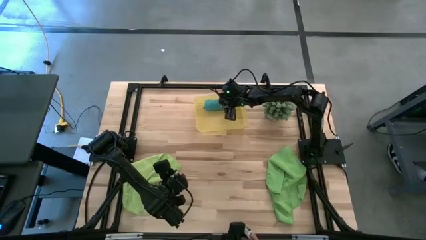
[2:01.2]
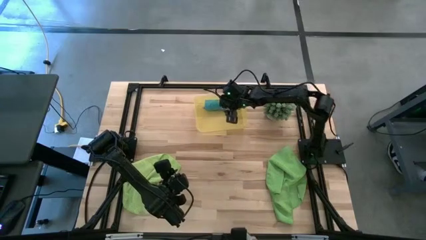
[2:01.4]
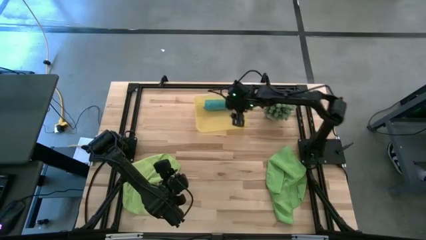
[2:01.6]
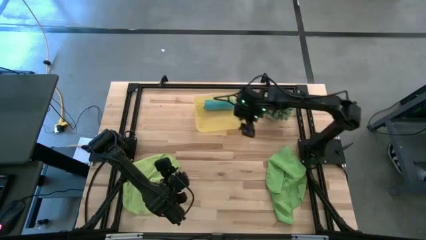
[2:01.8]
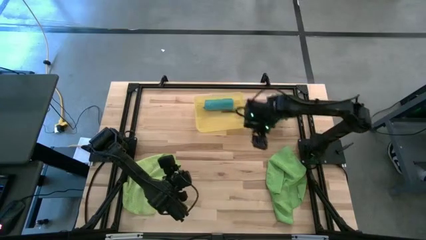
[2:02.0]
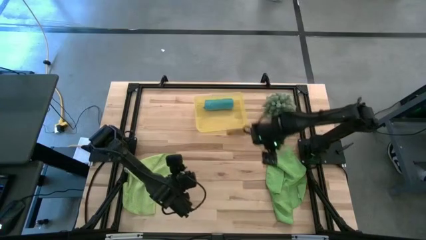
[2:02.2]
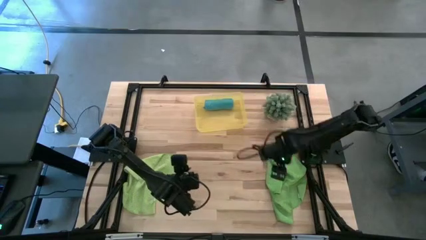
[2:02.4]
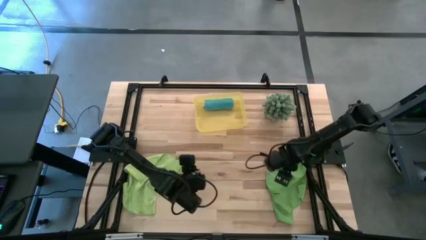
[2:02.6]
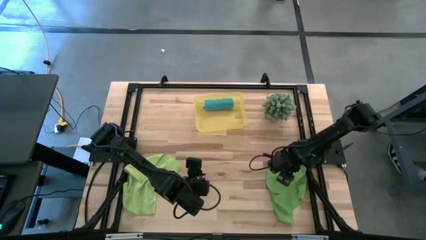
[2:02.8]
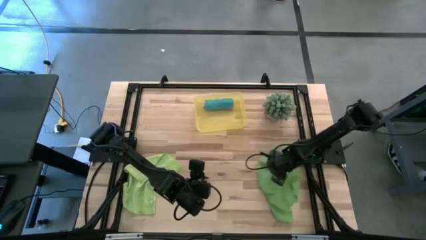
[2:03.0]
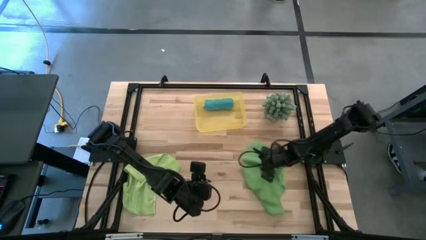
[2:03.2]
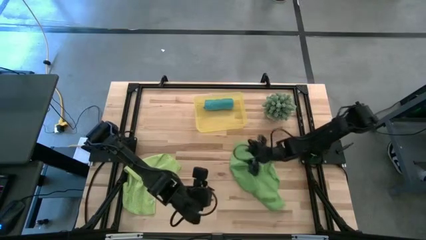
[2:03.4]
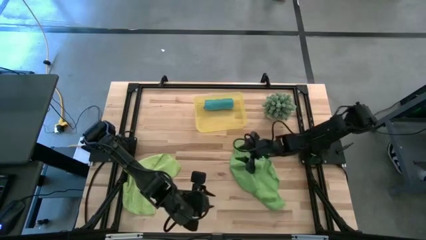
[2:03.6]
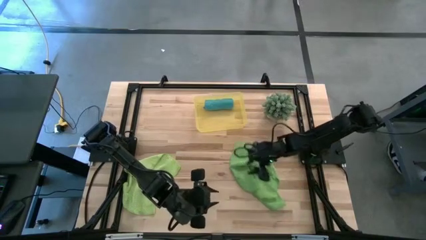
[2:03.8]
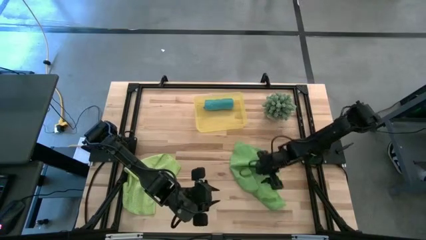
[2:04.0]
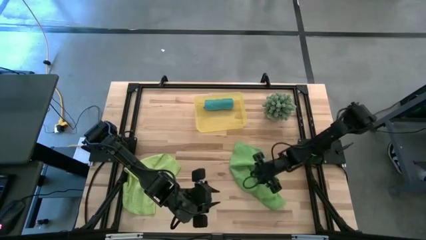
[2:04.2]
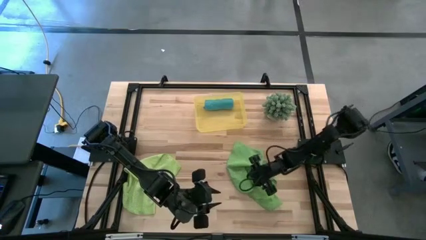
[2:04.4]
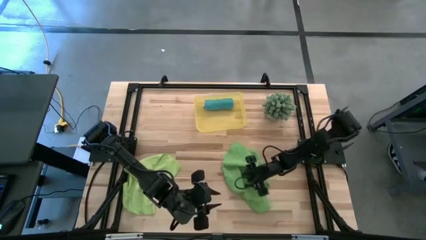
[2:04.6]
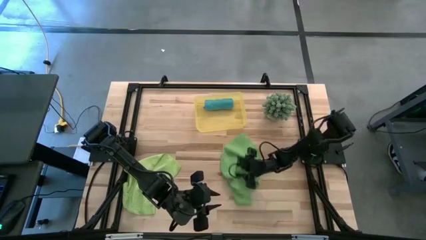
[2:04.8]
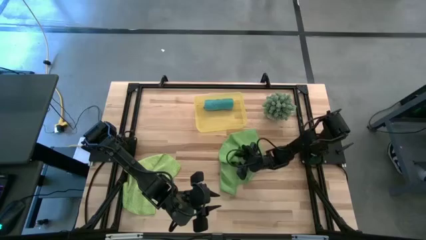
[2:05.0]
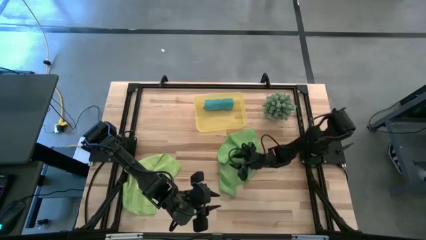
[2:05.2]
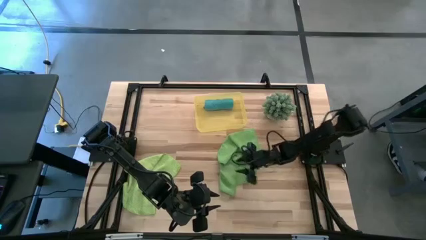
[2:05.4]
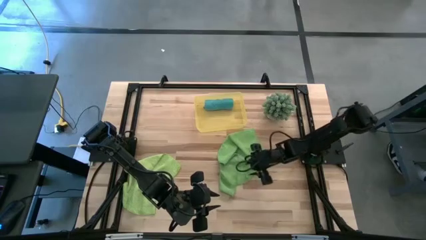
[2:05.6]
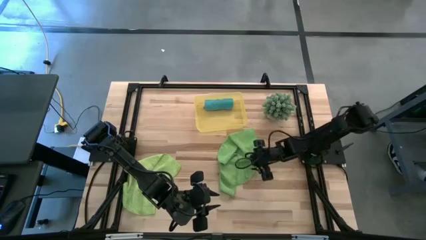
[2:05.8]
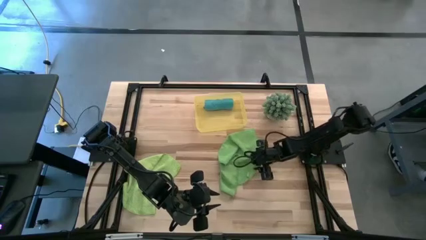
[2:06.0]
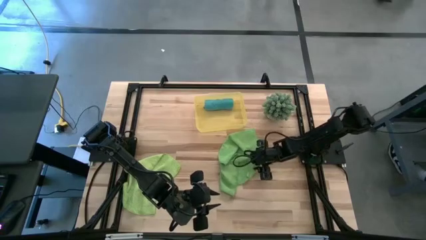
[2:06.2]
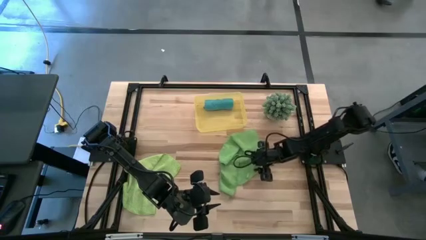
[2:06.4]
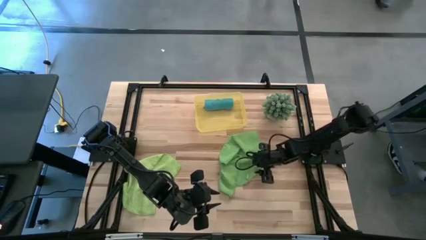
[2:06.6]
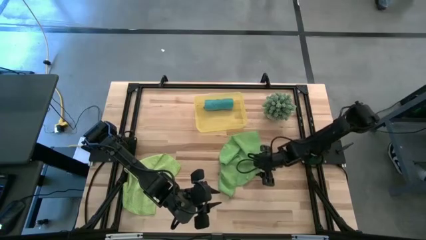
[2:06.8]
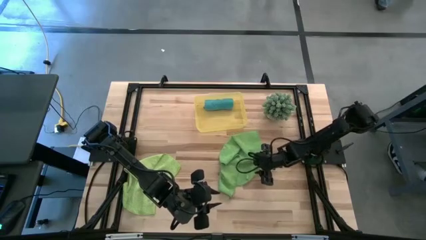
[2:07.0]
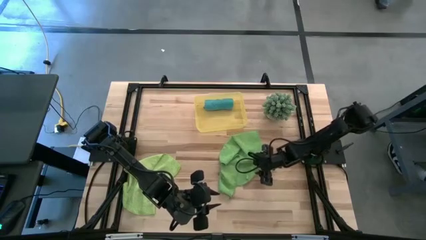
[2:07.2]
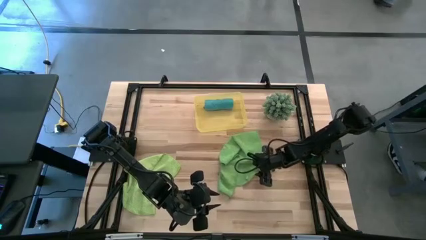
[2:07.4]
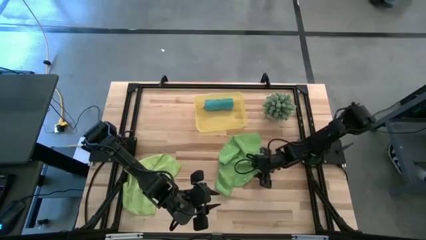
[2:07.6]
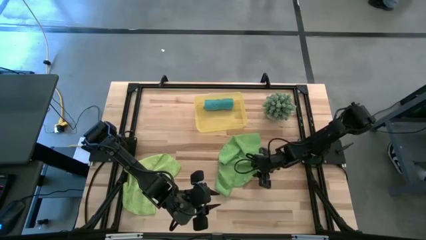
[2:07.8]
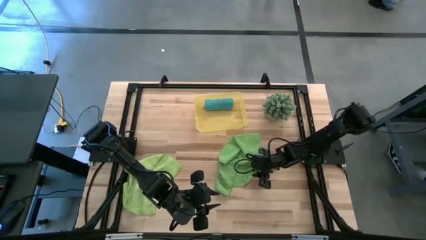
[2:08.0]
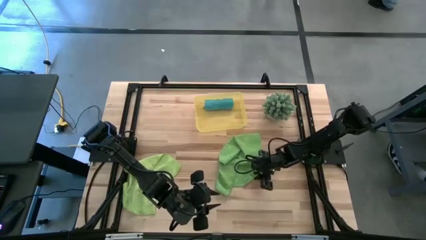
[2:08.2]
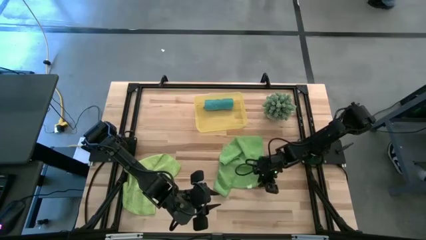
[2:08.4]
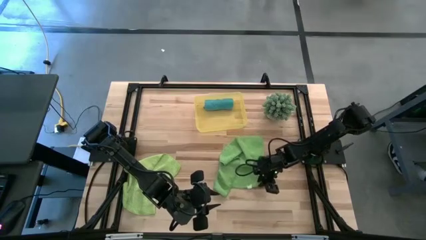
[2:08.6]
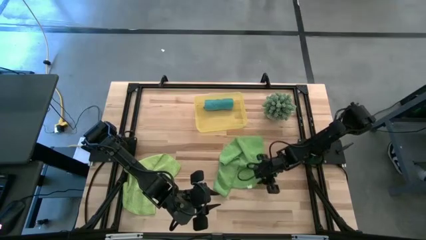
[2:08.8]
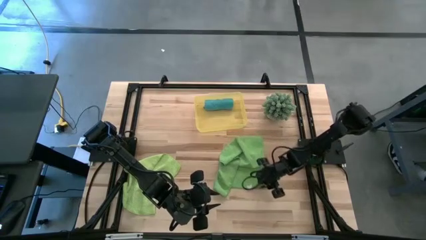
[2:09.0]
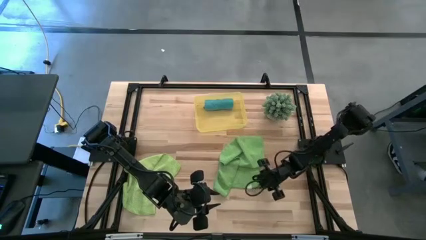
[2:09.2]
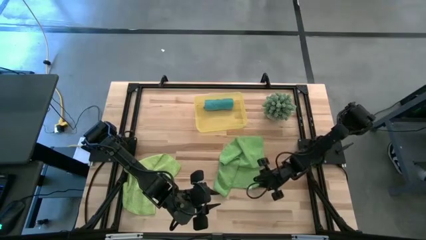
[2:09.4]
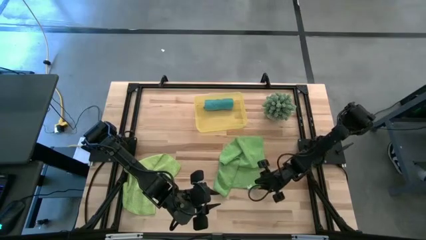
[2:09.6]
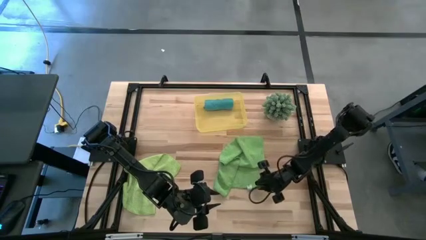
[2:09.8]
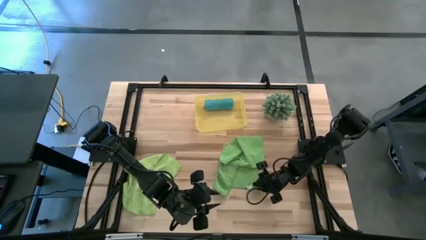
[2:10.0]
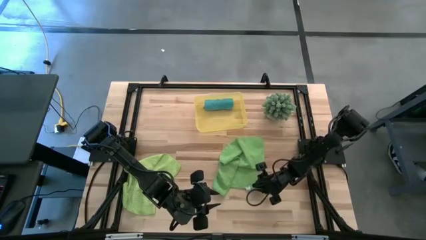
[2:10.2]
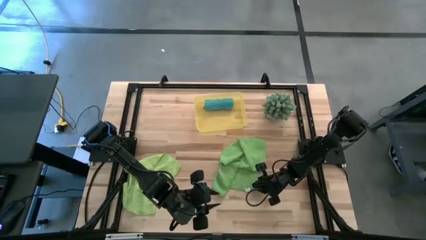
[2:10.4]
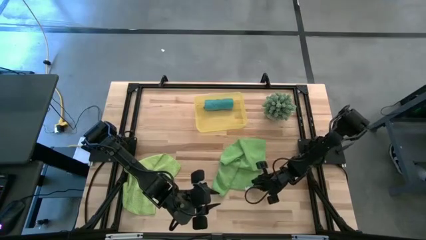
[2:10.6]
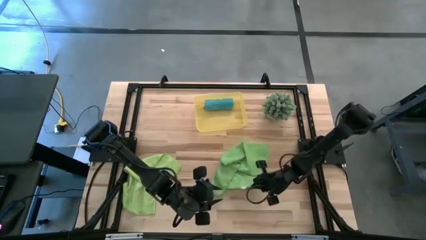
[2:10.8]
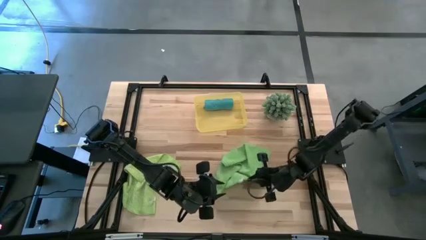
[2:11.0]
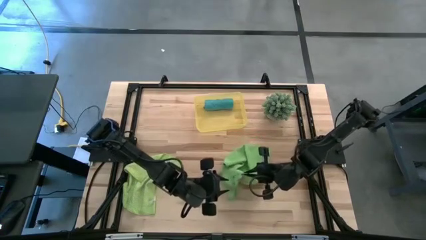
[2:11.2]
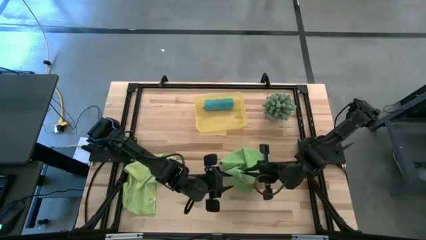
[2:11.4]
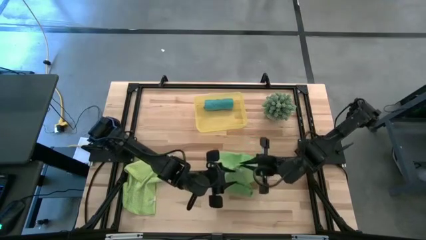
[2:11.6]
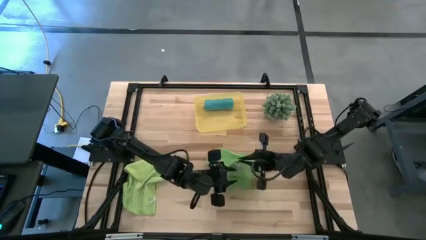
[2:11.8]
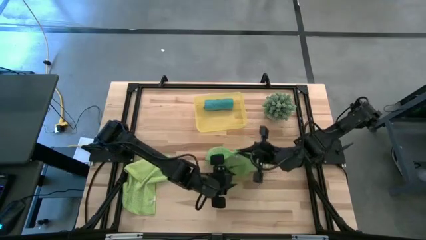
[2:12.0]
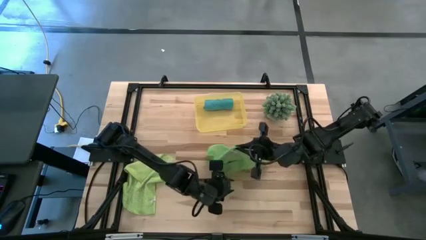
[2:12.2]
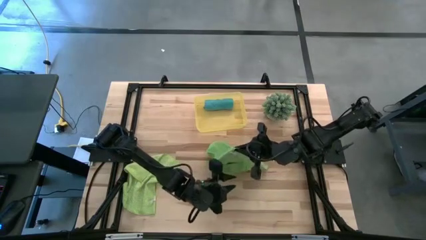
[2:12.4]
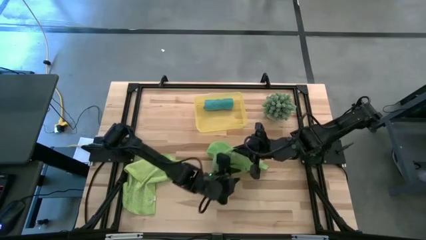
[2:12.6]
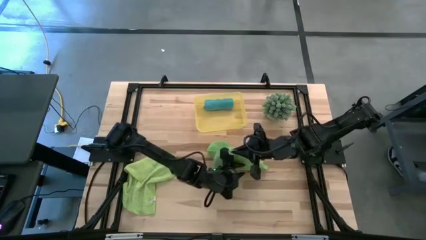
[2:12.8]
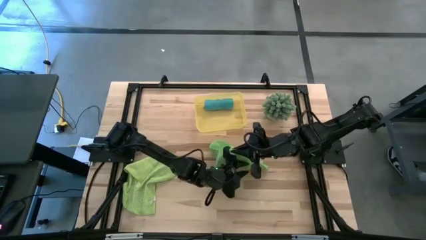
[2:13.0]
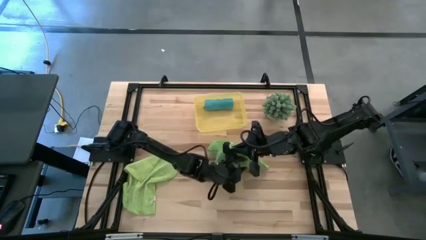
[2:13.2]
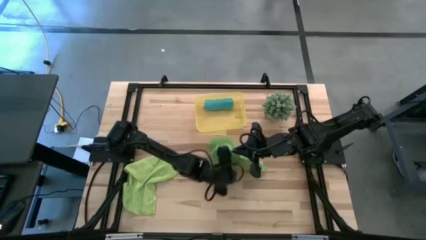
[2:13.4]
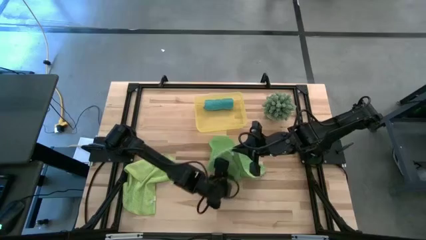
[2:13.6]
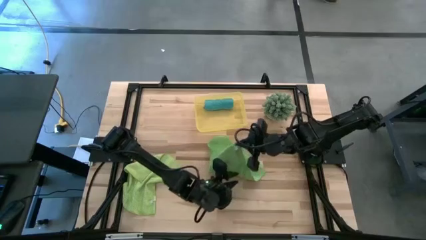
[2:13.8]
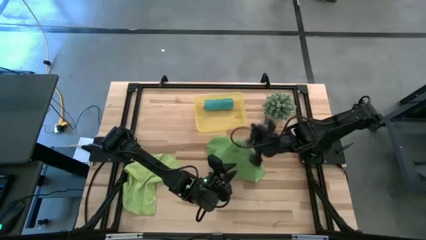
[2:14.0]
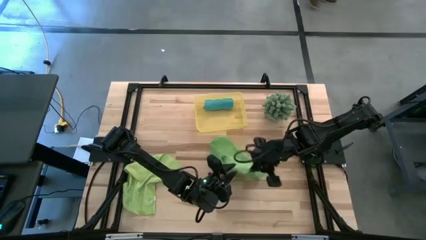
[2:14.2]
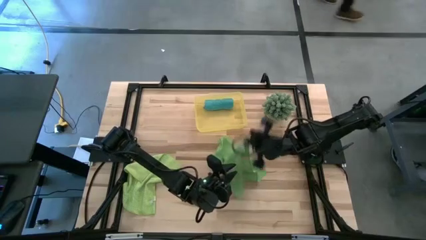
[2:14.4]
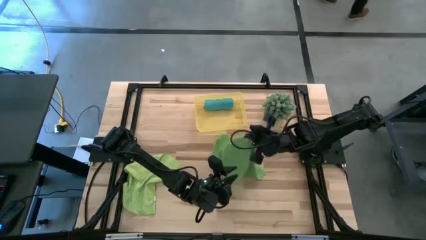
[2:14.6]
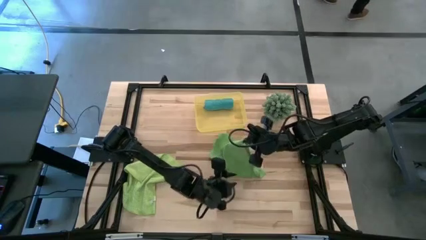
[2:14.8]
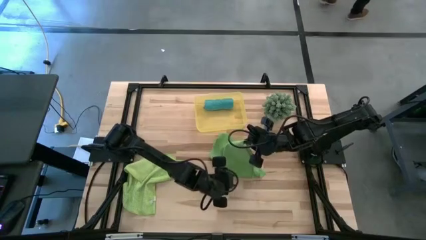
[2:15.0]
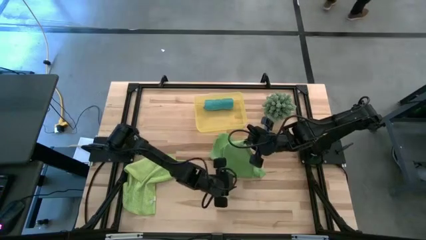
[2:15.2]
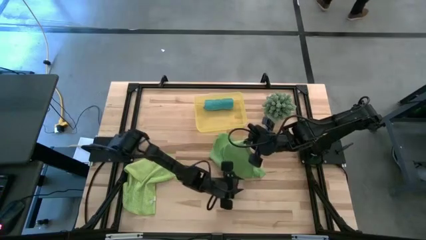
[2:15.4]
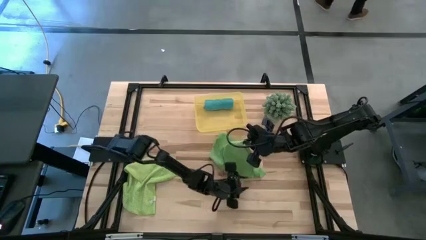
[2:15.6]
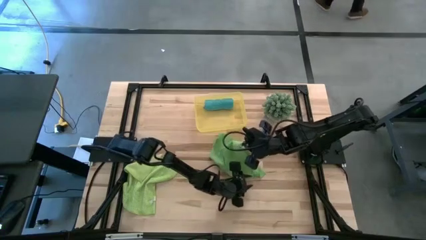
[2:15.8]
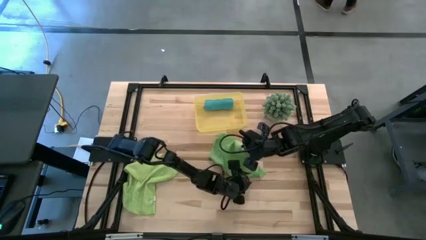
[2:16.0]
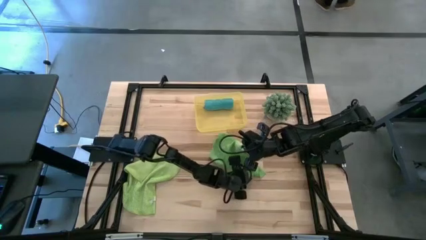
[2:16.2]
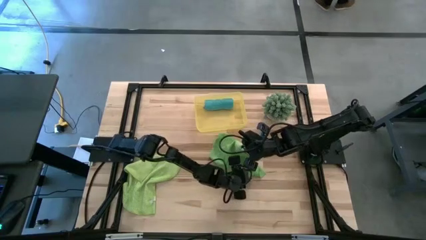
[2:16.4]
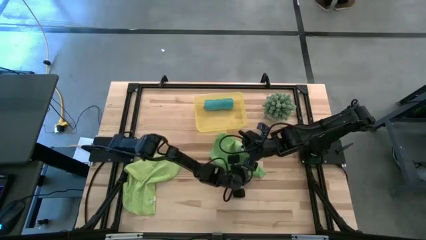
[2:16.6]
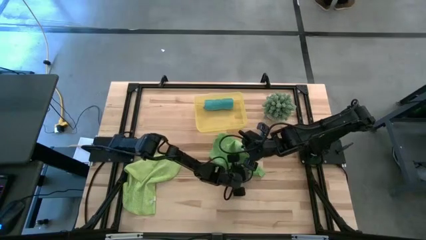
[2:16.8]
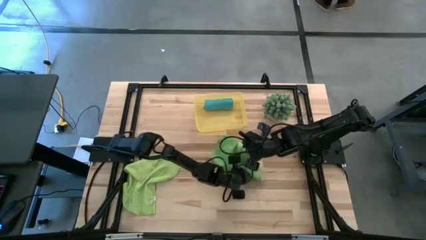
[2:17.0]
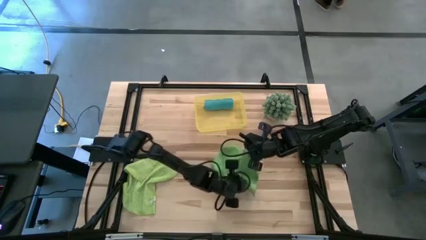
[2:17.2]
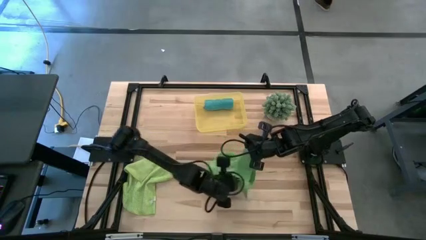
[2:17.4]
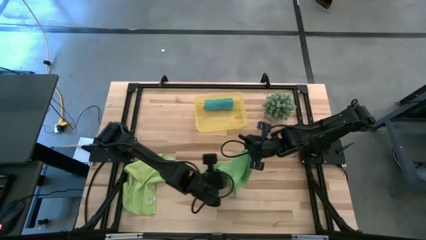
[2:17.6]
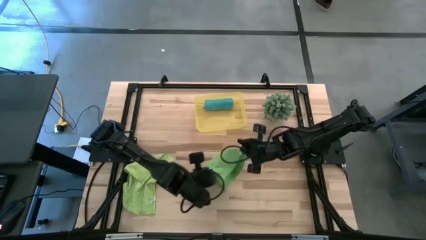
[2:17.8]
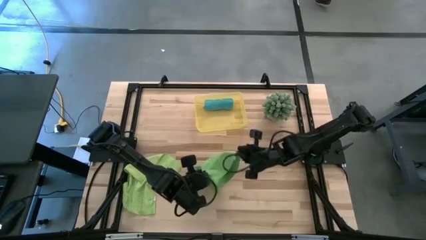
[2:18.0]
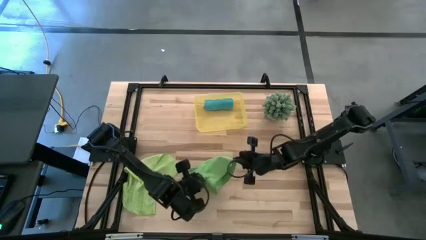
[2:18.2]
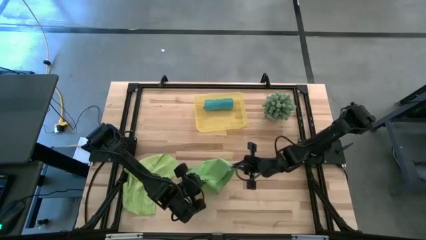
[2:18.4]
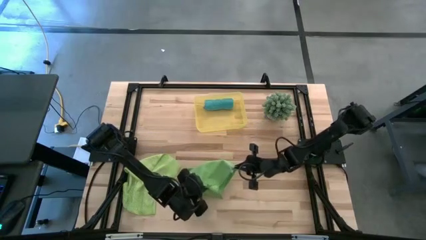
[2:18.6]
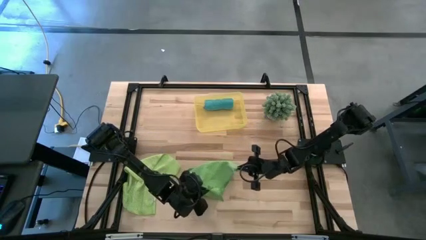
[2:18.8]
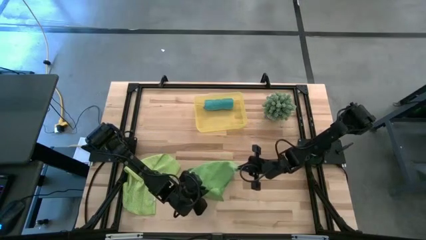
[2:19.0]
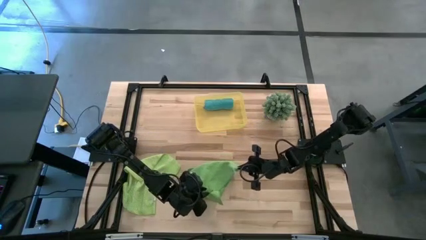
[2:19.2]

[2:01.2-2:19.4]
Task: Roll microfiber towels into tight, uniform cylinder then place into a basket
Fold the green microfiber cloth
